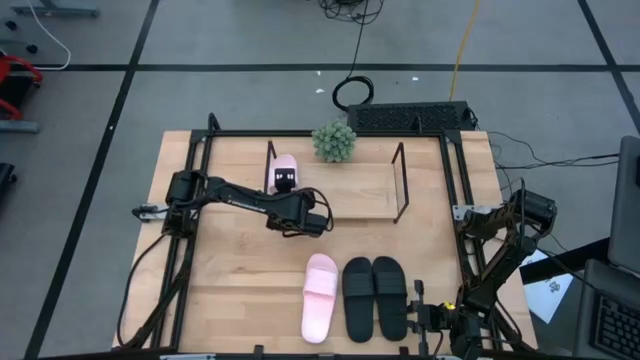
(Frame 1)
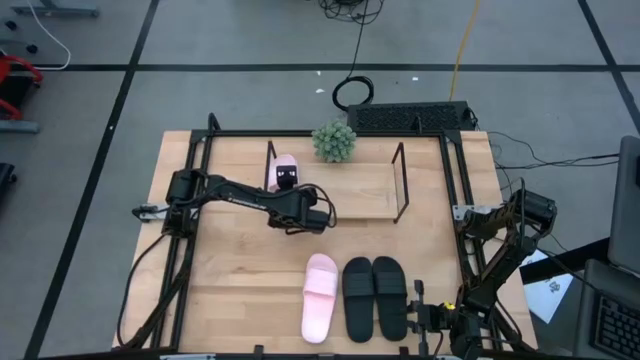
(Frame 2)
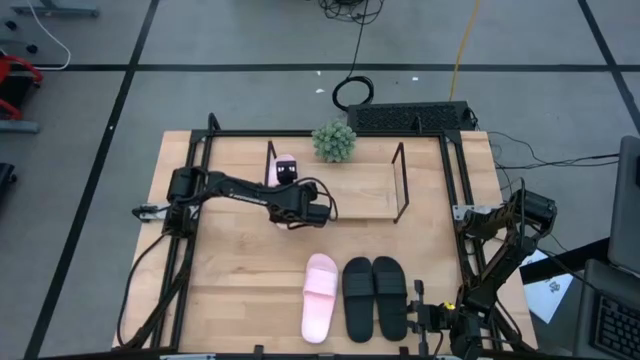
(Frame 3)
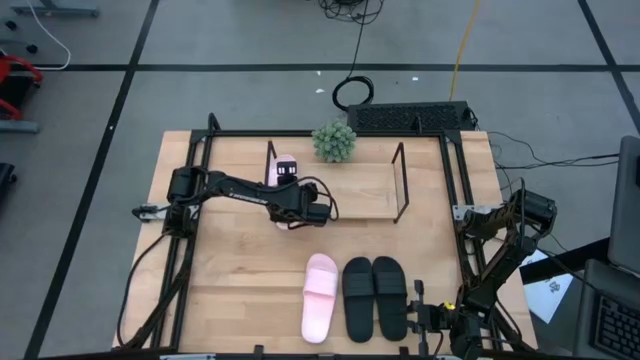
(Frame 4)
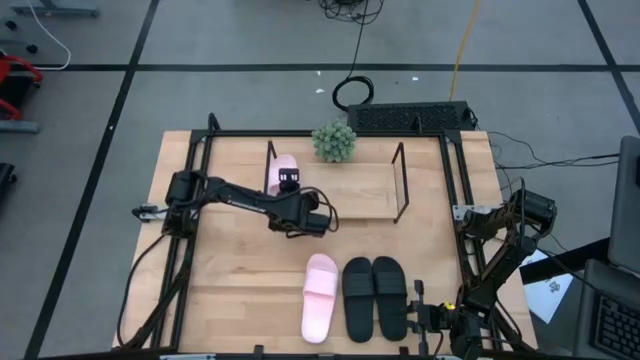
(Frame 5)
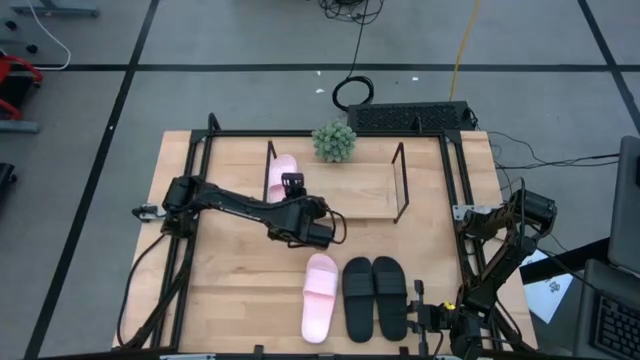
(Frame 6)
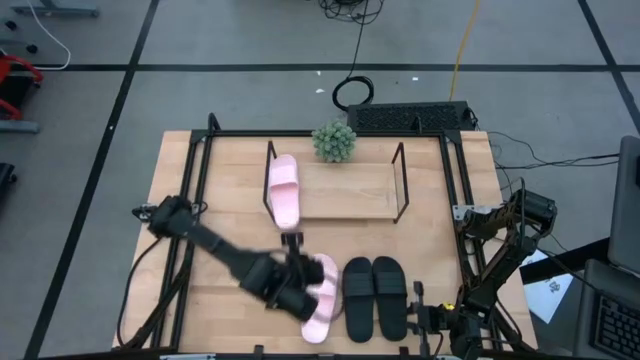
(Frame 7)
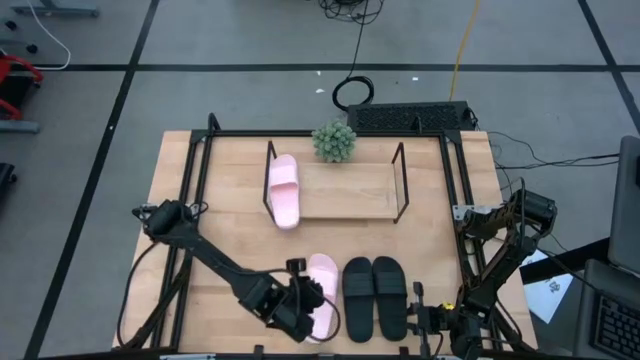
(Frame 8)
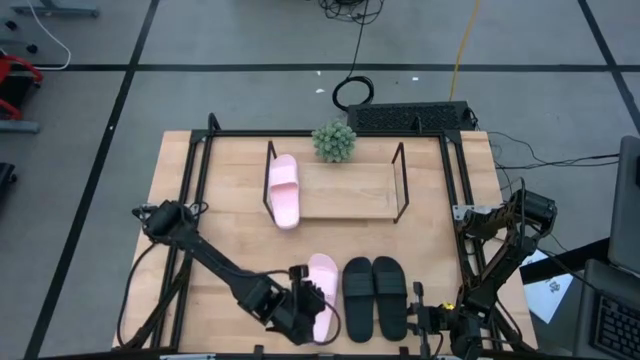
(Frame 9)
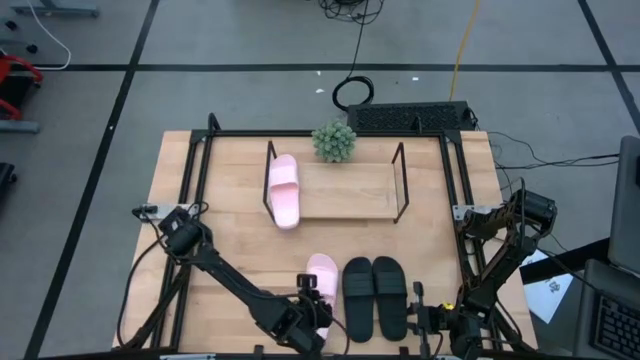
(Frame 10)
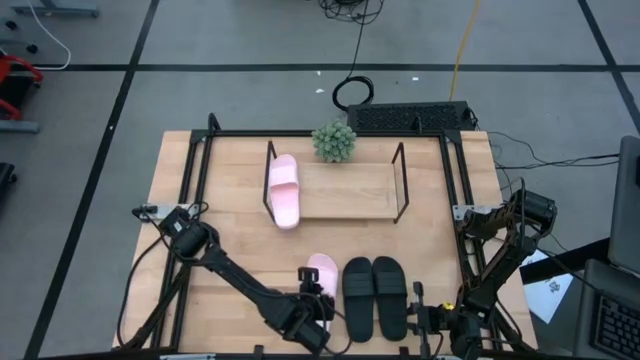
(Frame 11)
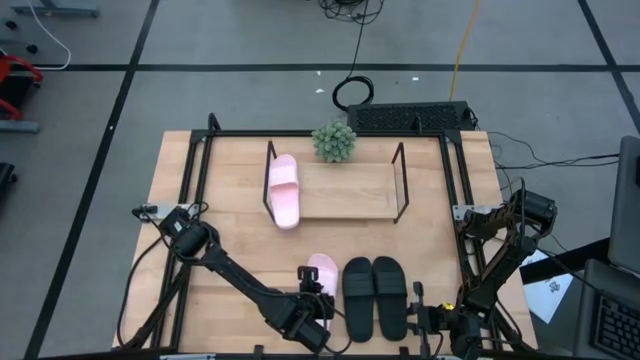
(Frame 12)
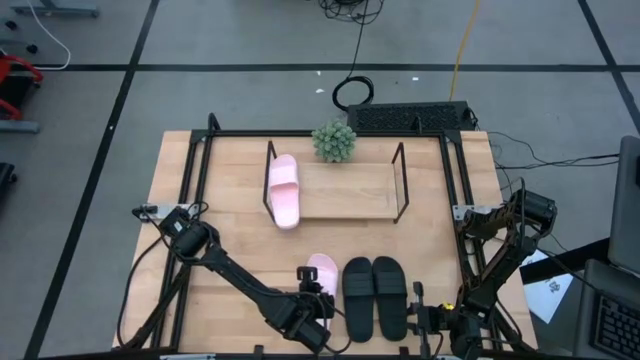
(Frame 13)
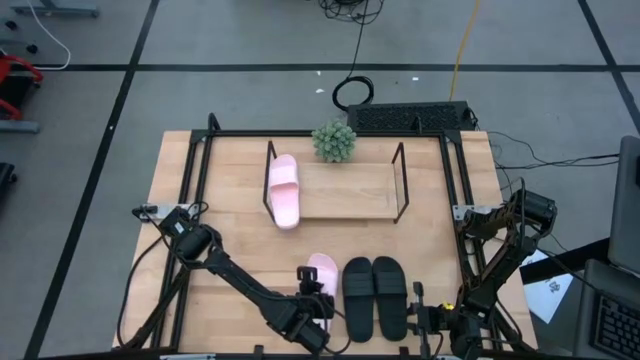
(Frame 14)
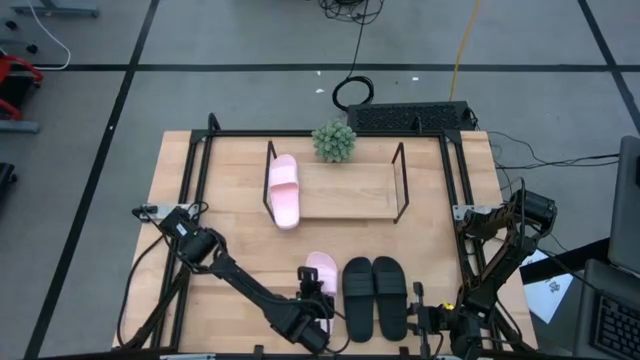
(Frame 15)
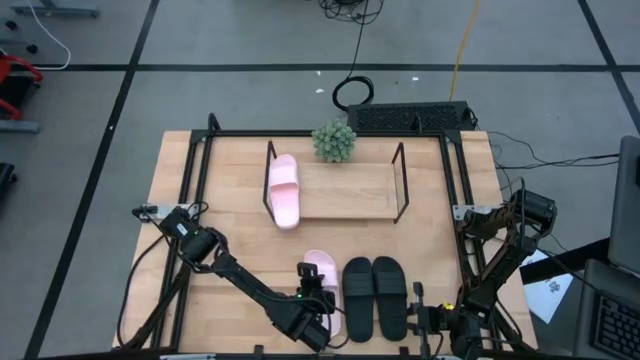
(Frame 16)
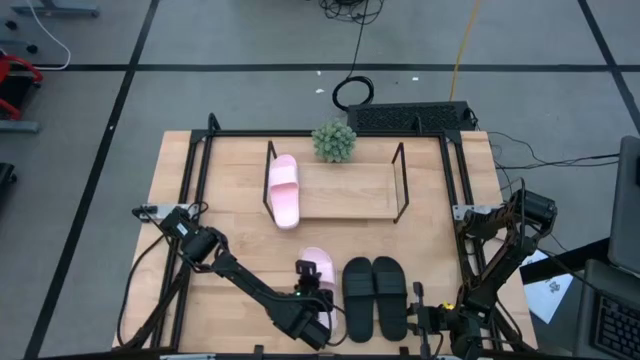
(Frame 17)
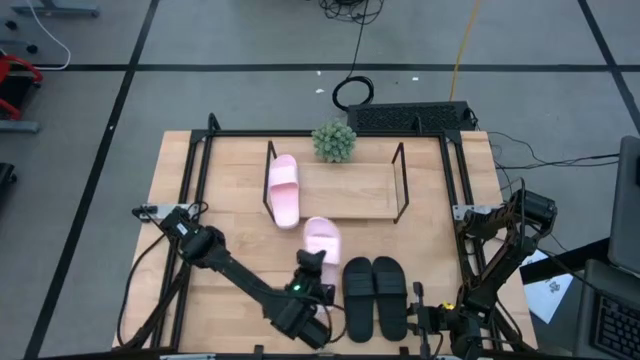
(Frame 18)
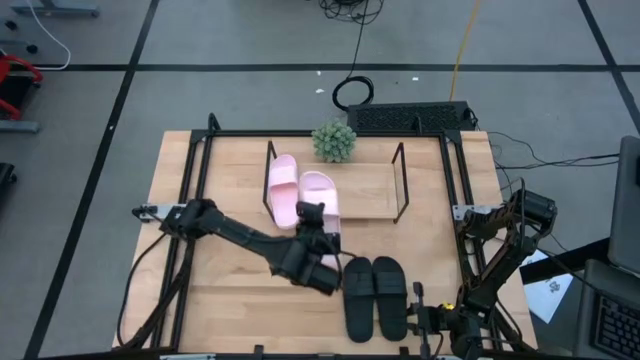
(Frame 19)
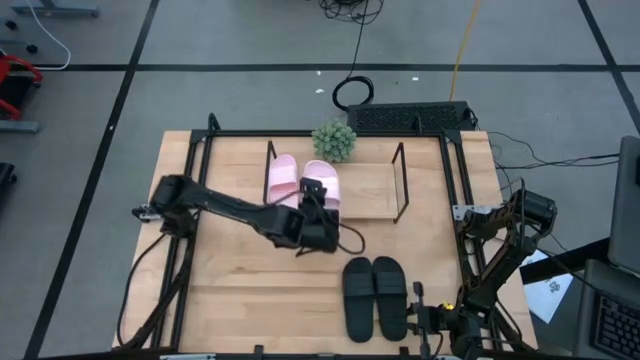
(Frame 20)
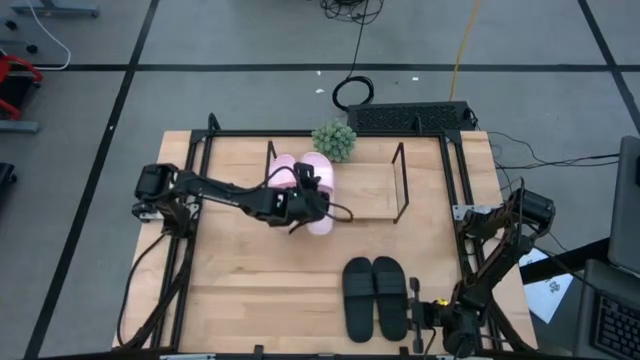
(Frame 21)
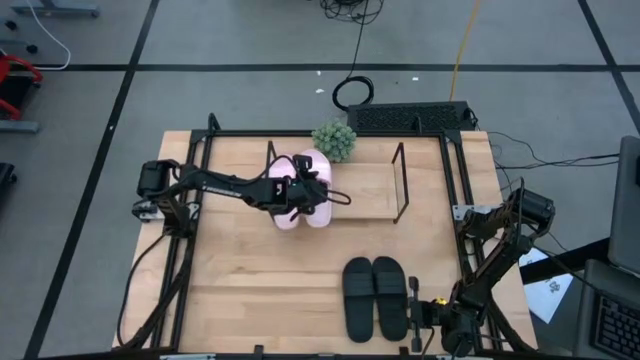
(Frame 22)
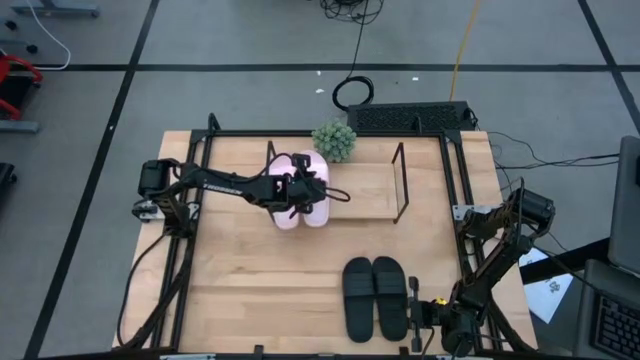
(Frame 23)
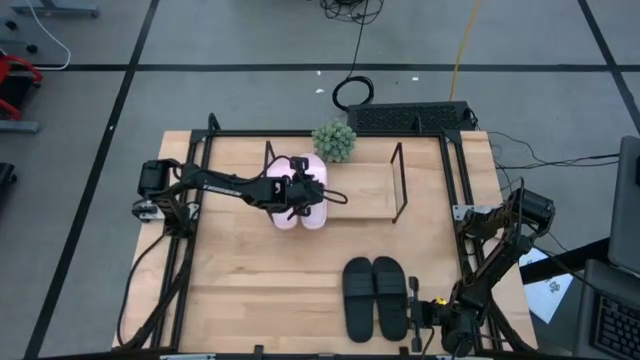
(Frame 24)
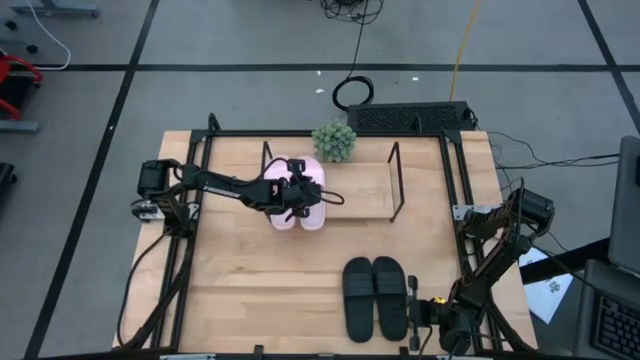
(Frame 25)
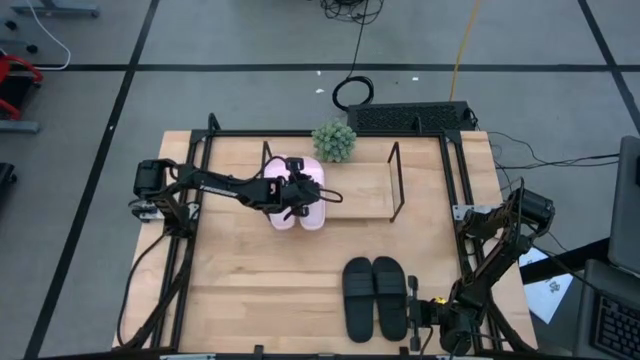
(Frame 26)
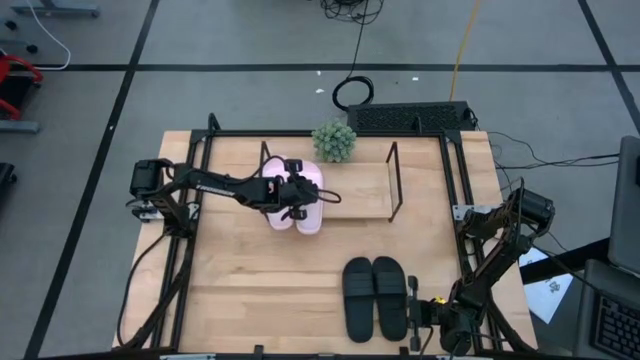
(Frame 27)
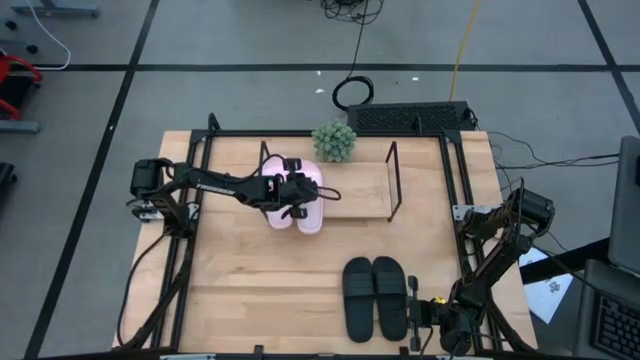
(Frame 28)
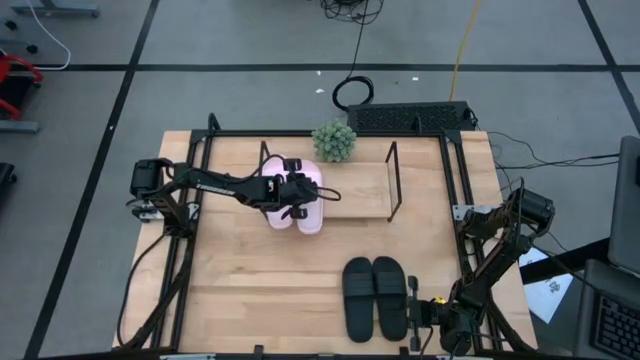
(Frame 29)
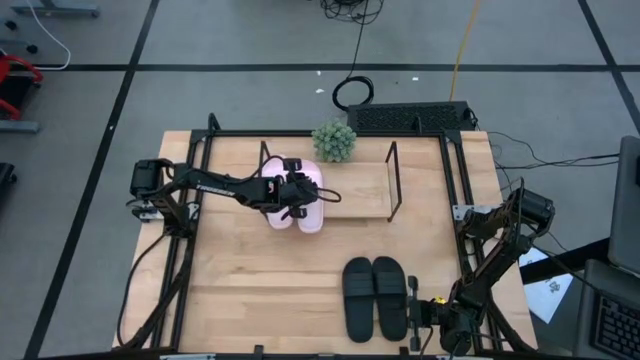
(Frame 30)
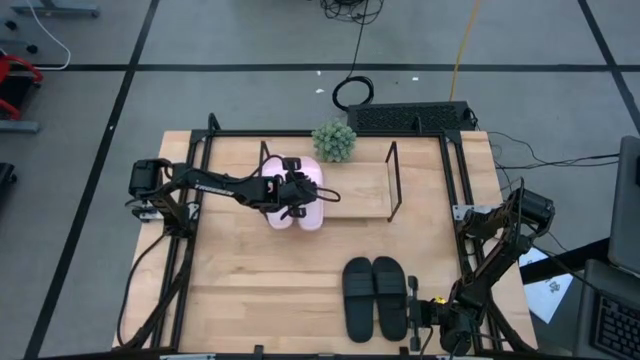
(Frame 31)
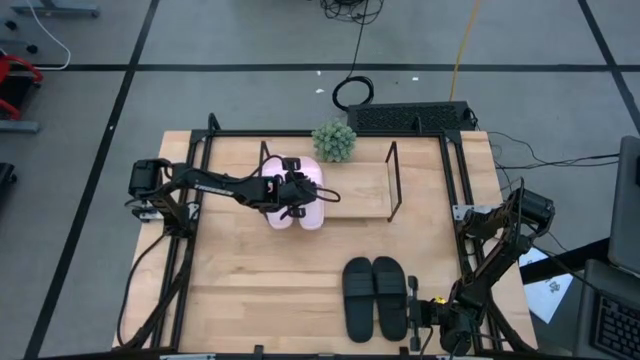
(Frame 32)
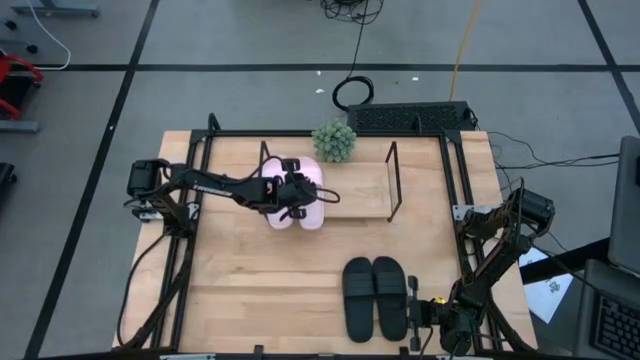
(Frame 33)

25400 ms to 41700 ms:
Task: Pick and place slides into the shelf
Put the pink slipper on the shelf
